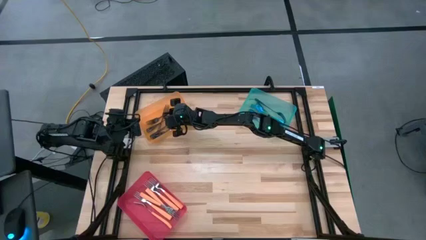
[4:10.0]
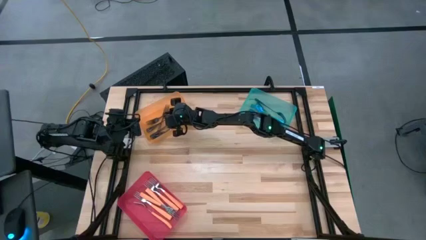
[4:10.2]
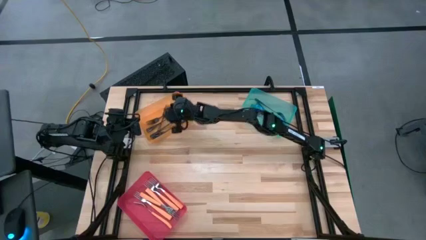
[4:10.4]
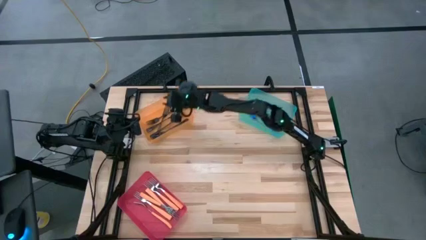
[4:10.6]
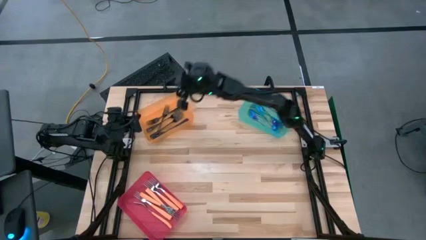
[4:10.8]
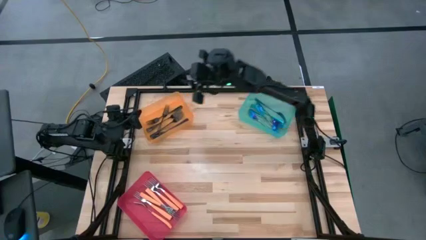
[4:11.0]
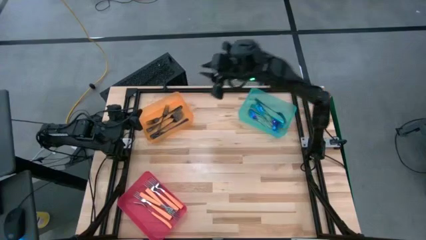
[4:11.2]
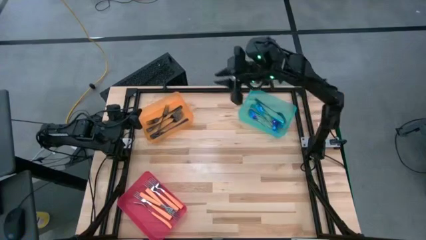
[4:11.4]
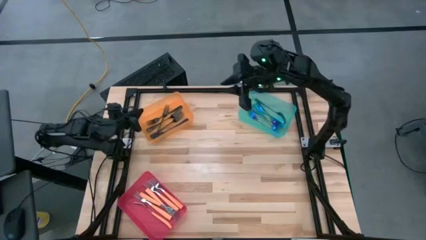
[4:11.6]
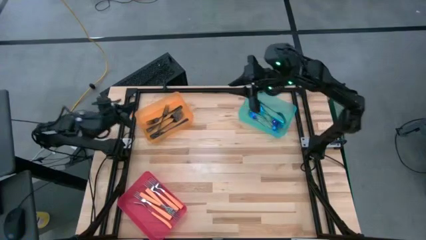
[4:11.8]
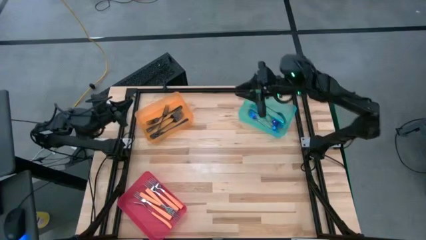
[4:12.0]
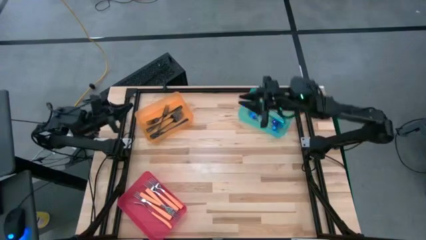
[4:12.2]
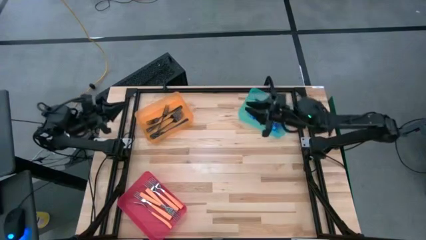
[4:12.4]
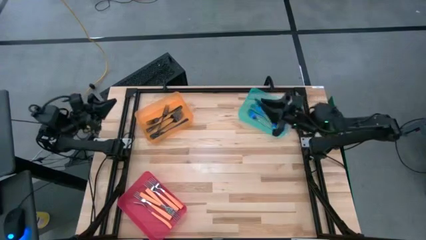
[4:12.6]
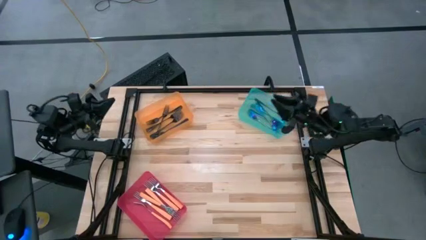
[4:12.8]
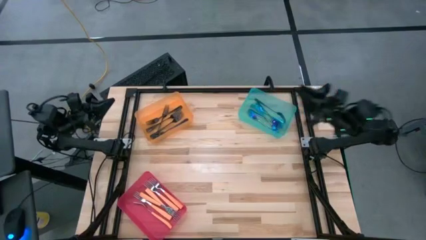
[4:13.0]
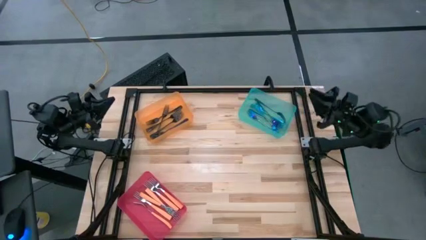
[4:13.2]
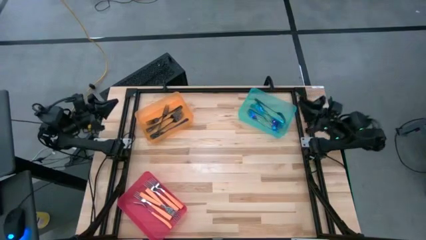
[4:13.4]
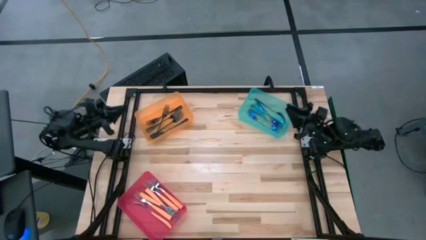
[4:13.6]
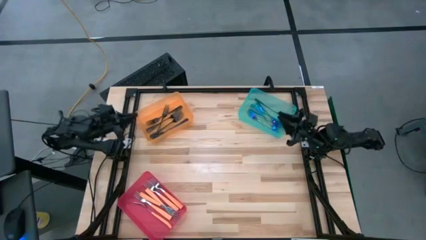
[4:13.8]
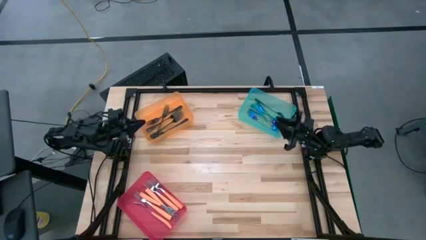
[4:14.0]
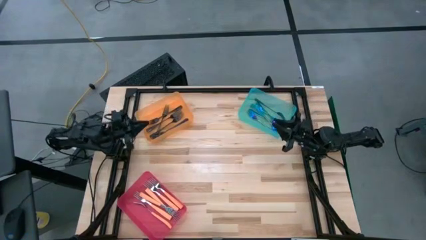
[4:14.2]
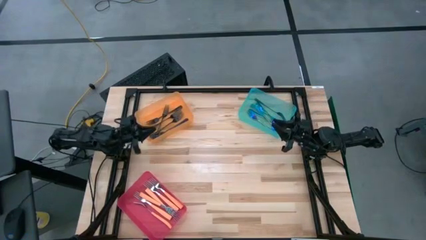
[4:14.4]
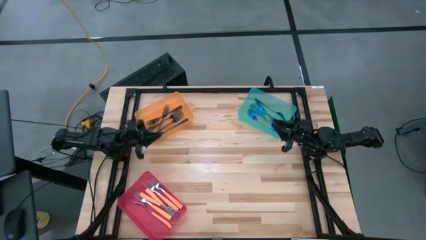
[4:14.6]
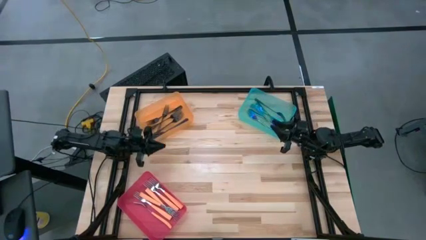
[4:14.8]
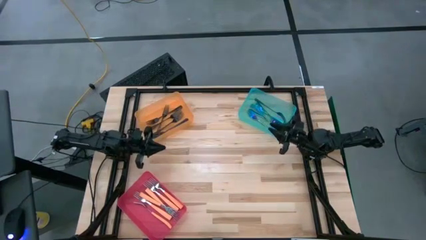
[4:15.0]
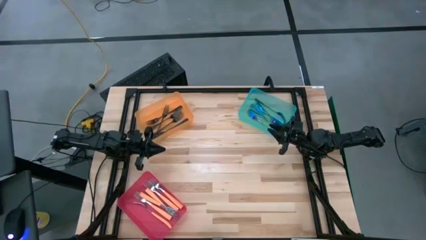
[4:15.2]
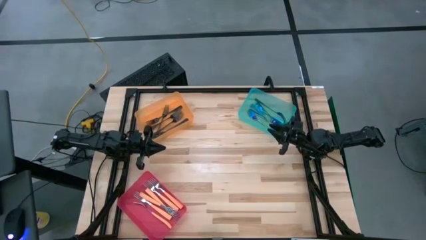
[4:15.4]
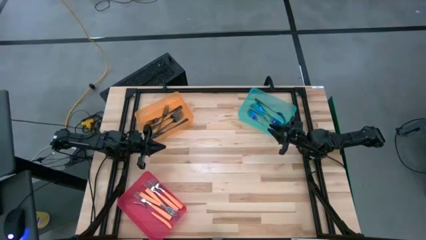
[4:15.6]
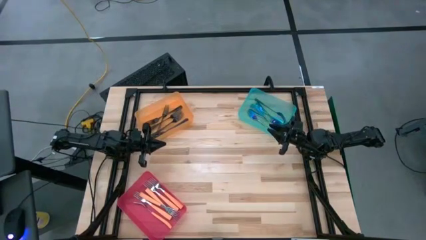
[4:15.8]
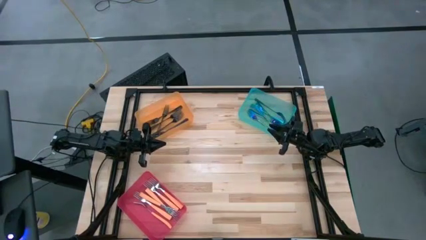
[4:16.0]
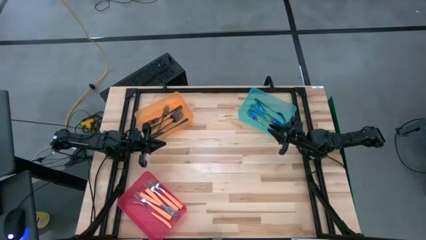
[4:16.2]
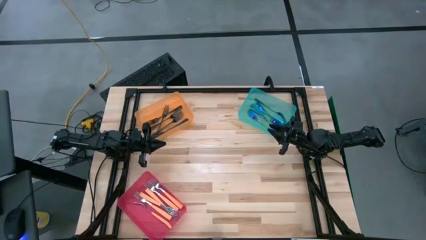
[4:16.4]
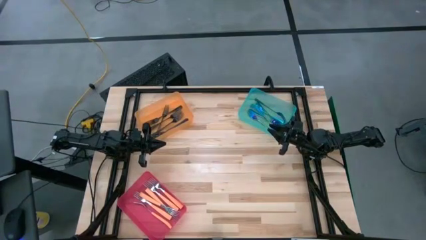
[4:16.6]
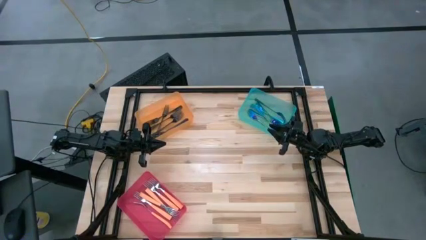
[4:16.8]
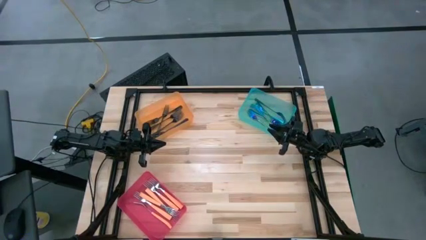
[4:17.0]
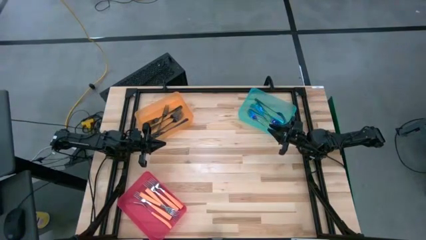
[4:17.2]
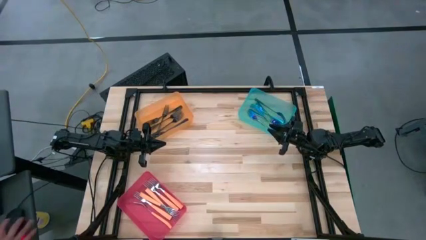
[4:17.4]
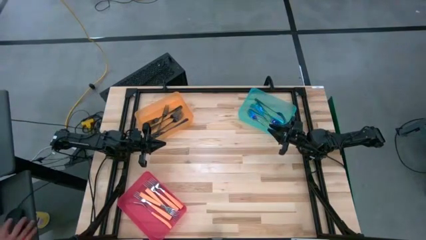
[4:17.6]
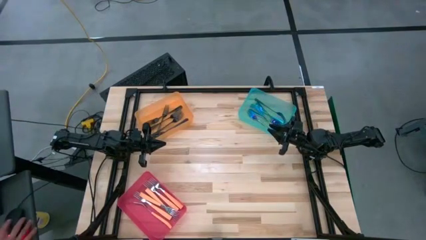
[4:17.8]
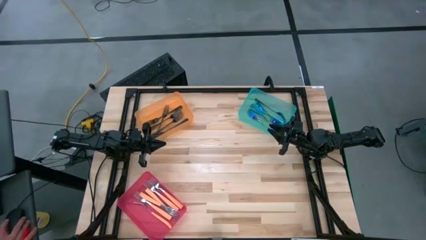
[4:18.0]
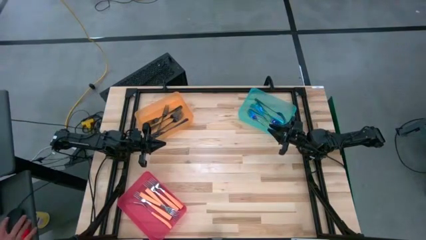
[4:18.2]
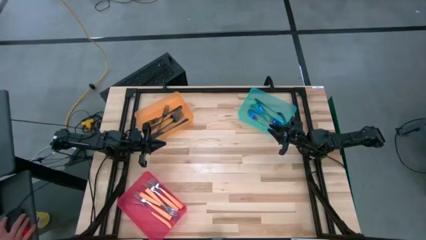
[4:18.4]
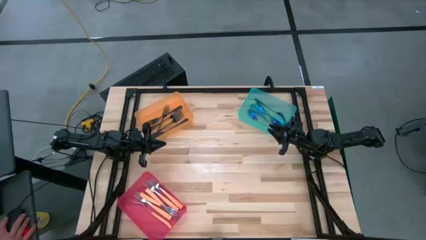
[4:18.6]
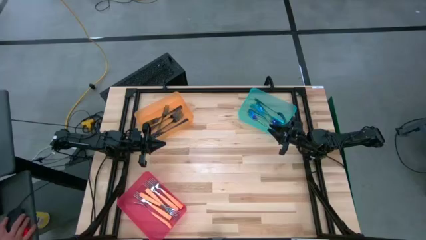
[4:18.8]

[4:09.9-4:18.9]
Task: Sort silverware by color (type)
Return to Home Position

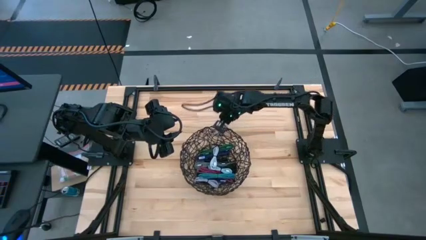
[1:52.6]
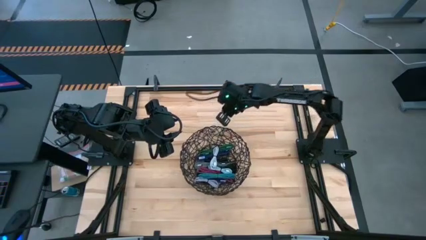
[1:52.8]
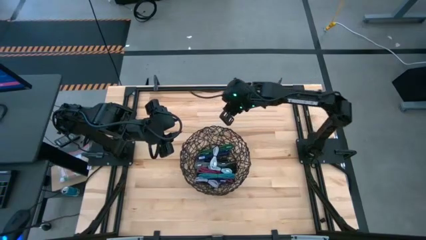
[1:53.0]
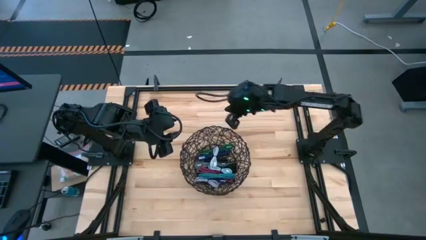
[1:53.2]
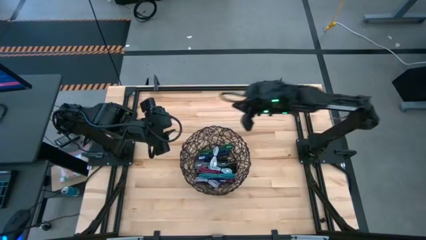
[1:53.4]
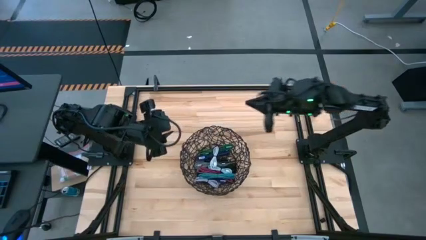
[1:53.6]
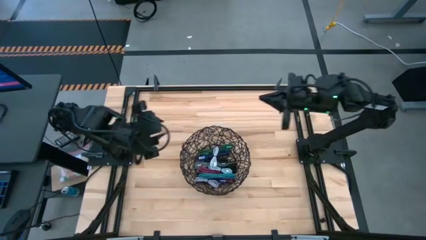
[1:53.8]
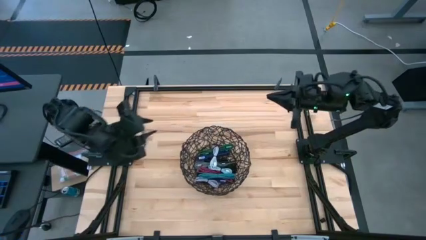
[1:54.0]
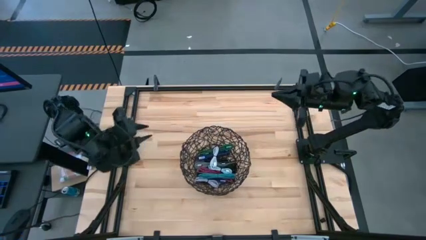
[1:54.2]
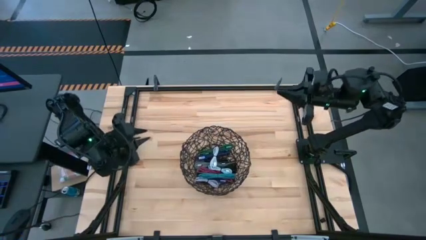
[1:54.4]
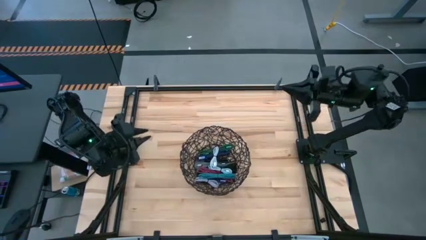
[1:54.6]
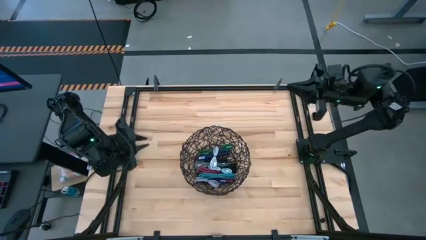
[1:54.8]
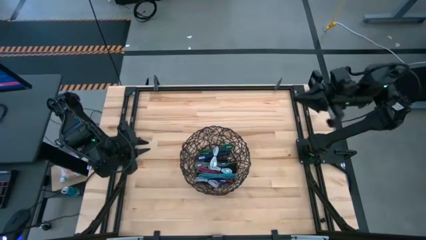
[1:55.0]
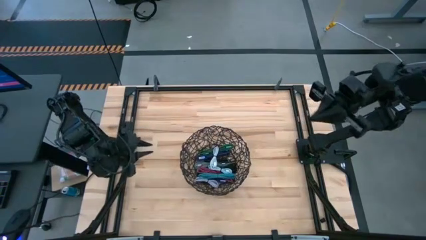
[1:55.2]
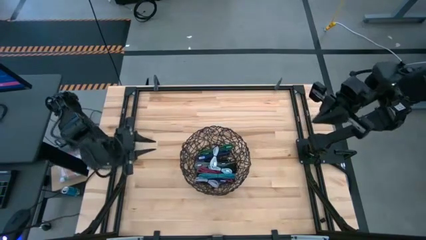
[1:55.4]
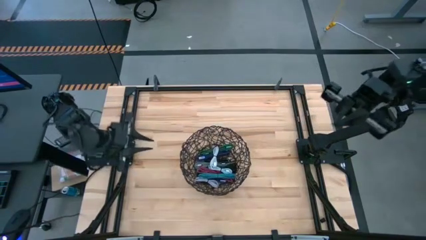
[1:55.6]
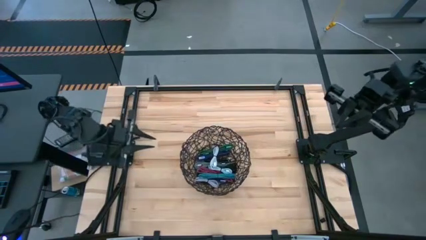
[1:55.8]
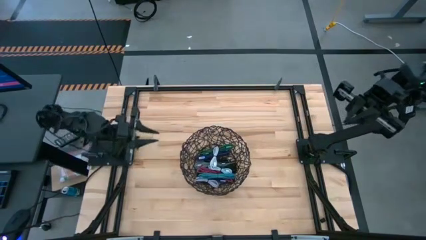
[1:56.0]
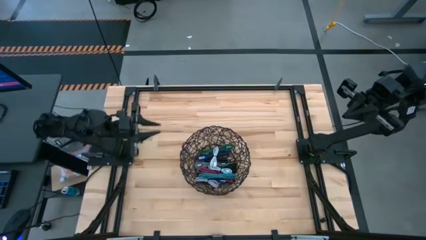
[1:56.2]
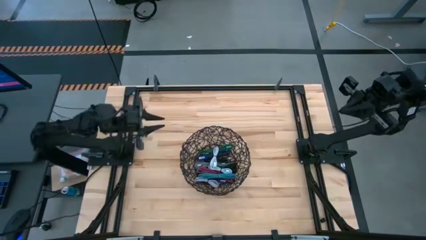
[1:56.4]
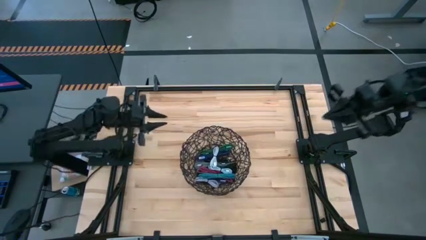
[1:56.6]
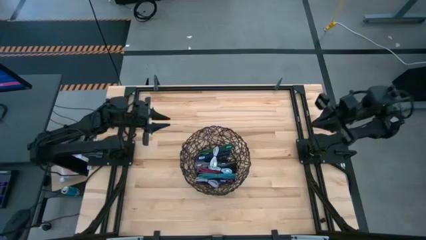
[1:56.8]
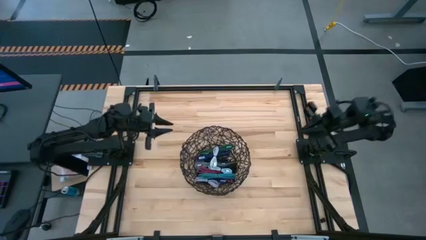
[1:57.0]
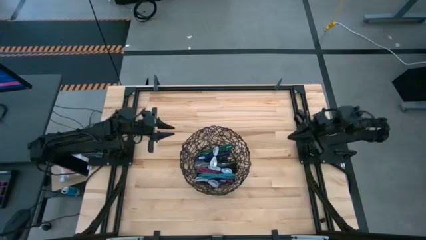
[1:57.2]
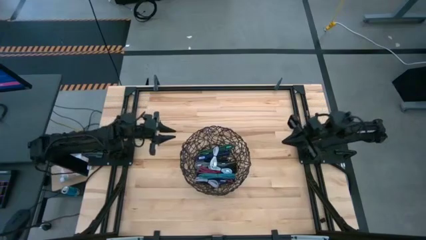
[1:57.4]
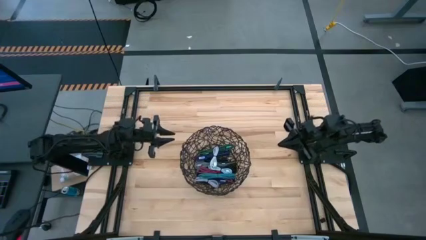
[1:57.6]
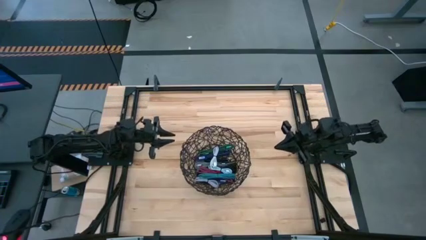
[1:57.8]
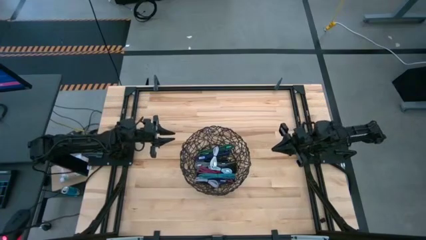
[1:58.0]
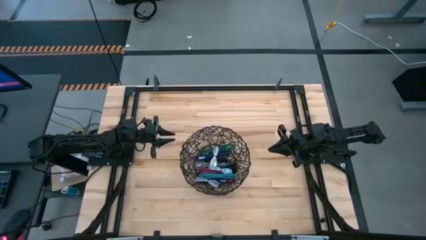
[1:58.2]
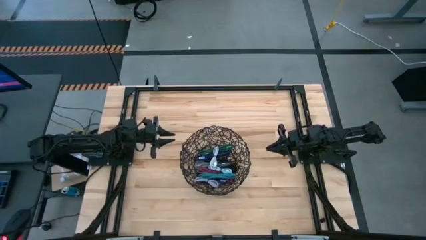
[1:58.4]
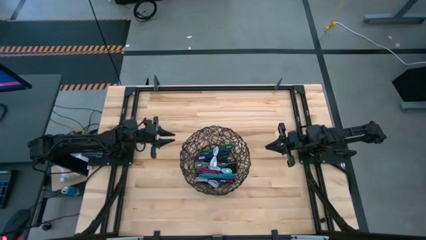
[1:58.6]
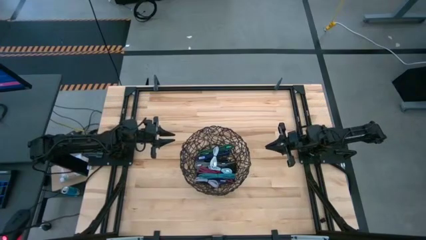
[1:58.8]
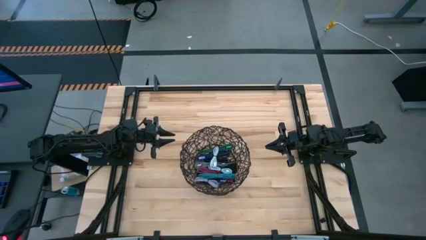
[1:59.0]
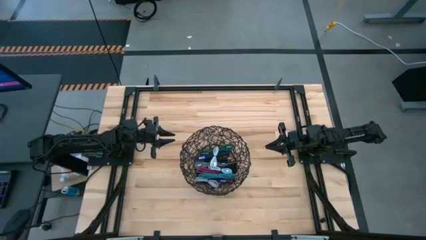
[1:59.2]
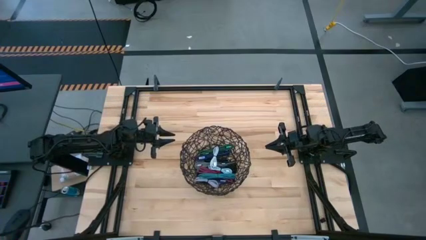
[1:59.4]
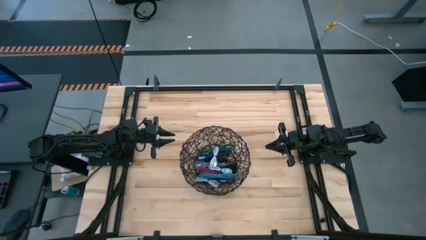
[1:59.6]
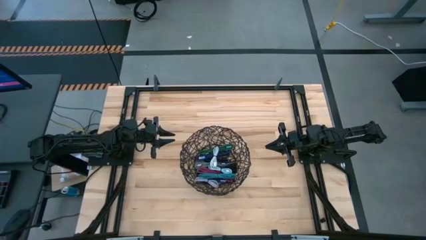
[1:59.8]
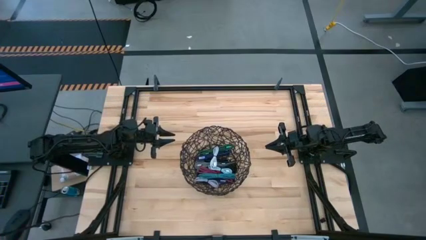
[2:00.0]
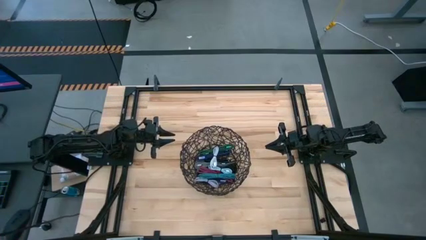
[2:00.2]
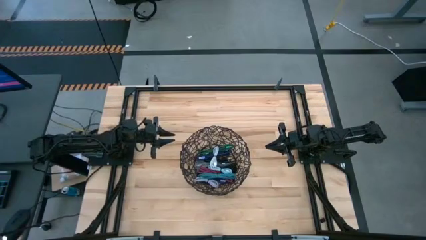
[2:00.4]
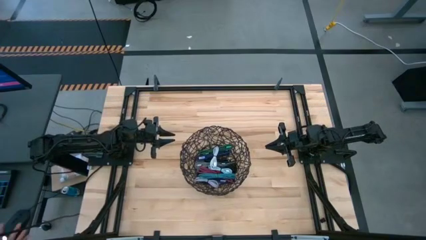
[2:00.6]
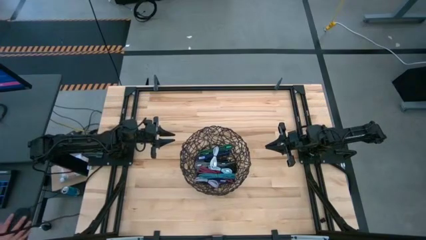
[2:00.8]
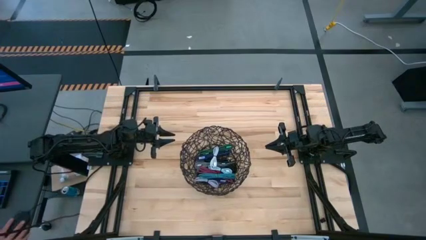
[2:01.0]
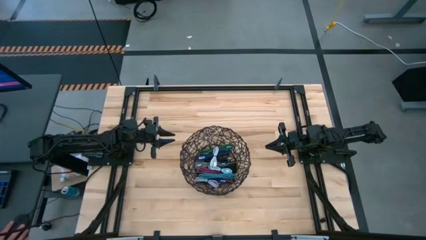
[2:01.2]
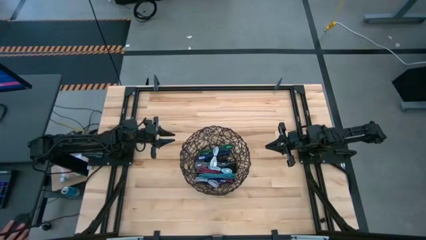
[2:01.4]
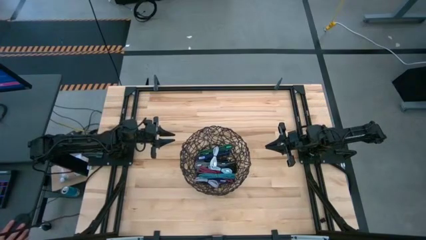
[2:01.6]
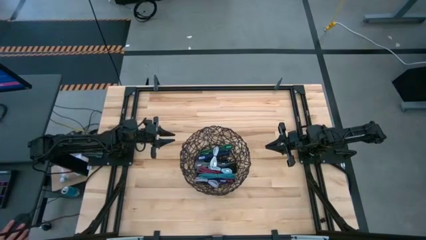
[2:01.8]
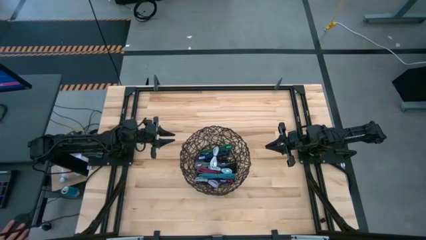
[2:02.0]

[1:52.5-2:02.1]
Task: Pick and place USB-C Cables
Return to Home Position
